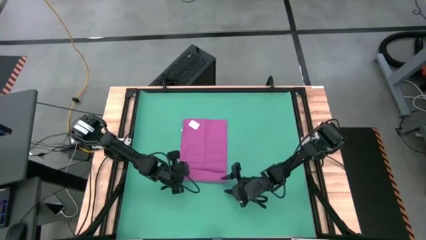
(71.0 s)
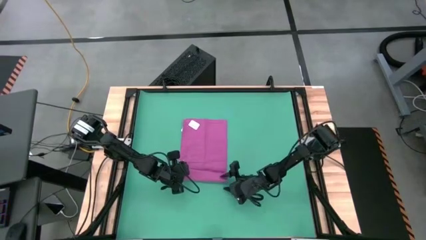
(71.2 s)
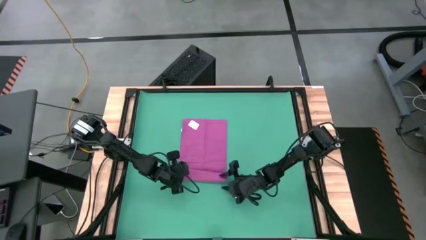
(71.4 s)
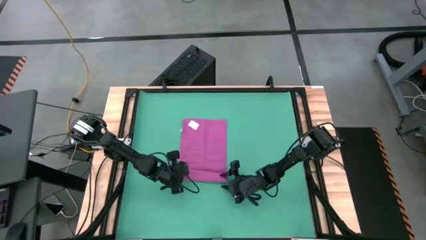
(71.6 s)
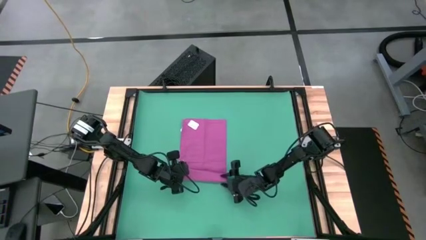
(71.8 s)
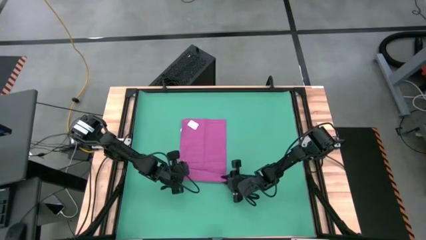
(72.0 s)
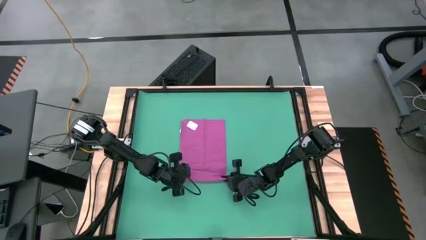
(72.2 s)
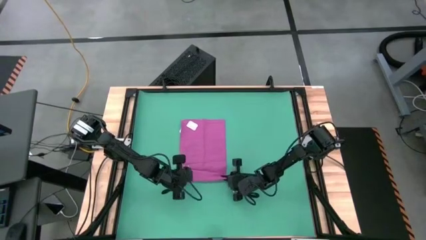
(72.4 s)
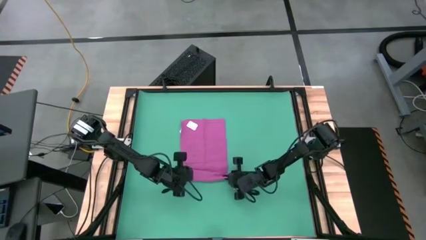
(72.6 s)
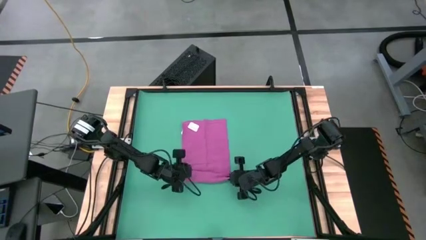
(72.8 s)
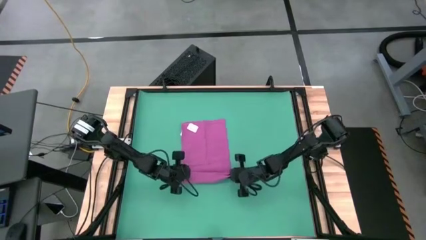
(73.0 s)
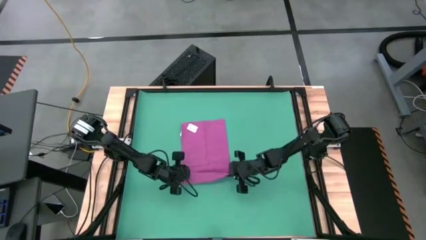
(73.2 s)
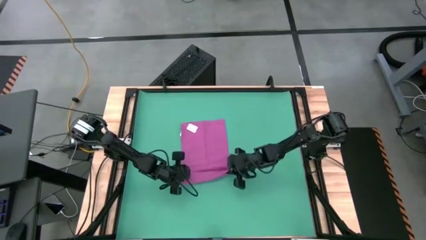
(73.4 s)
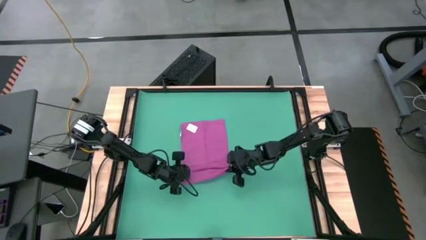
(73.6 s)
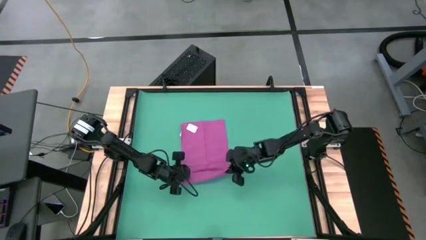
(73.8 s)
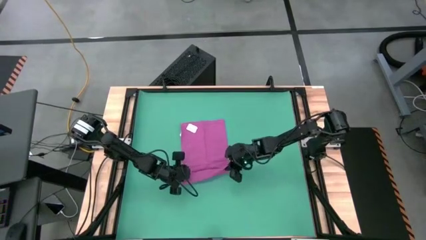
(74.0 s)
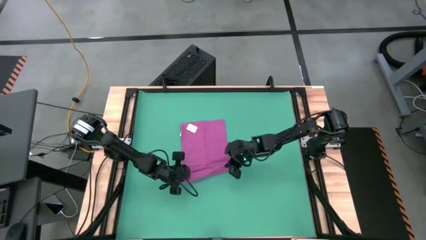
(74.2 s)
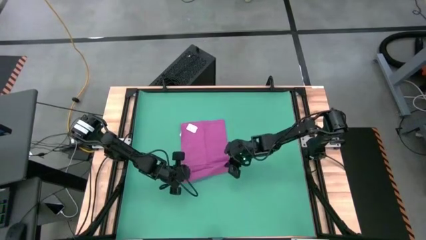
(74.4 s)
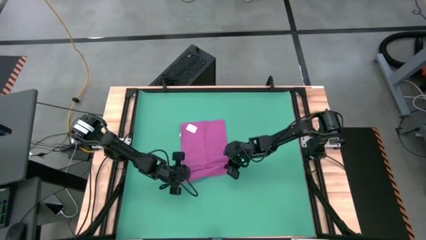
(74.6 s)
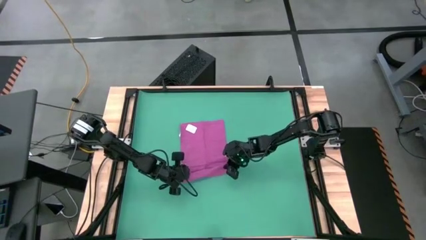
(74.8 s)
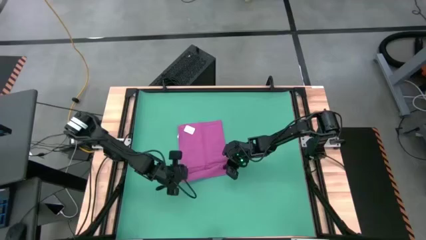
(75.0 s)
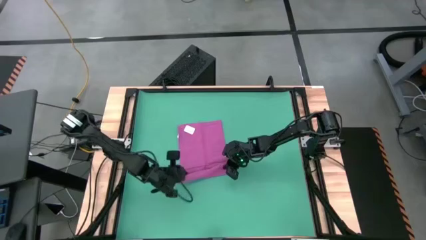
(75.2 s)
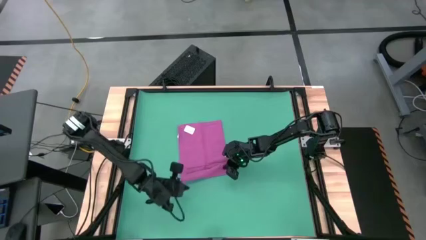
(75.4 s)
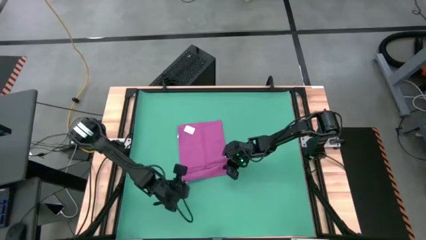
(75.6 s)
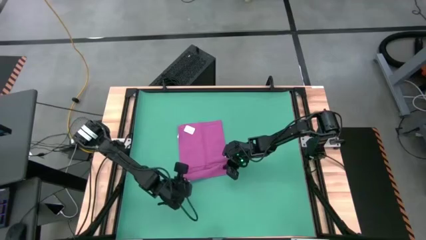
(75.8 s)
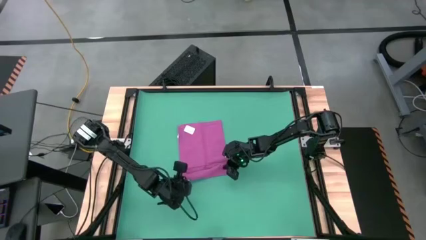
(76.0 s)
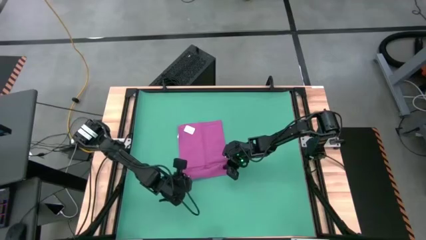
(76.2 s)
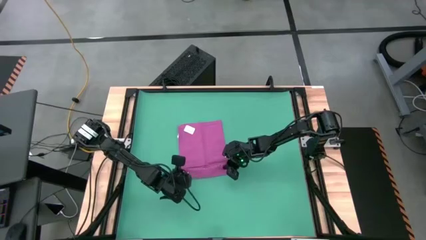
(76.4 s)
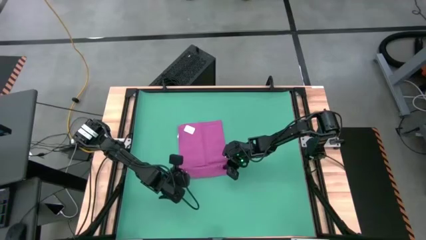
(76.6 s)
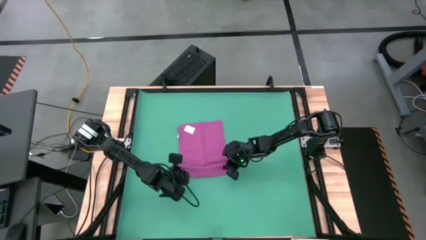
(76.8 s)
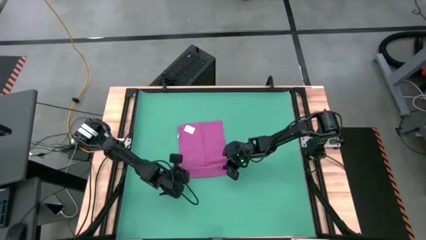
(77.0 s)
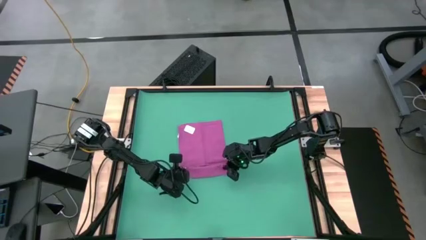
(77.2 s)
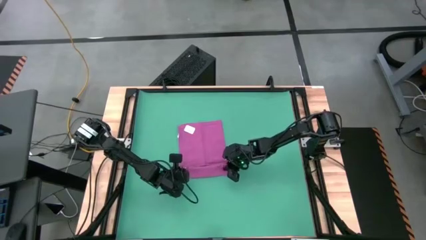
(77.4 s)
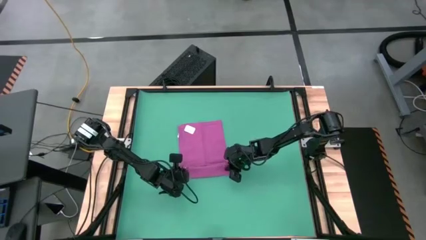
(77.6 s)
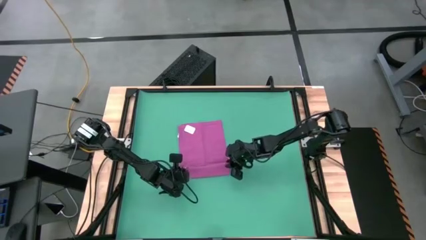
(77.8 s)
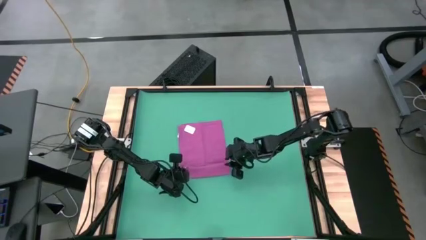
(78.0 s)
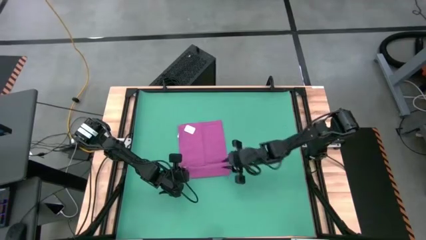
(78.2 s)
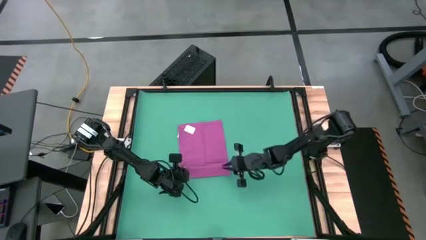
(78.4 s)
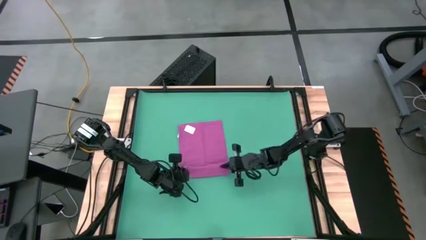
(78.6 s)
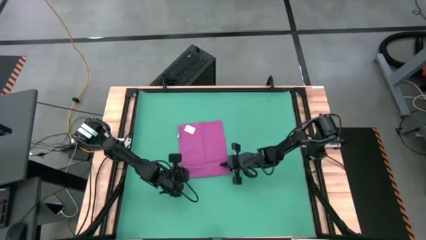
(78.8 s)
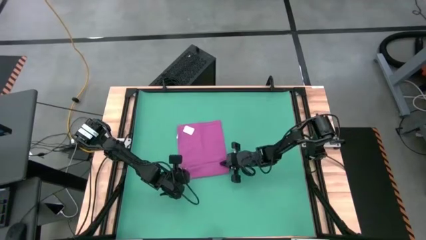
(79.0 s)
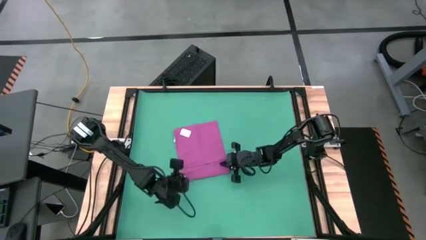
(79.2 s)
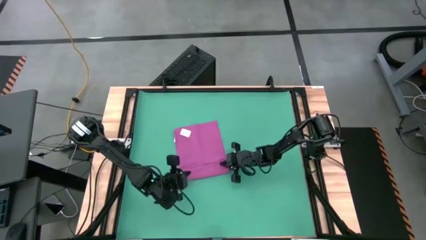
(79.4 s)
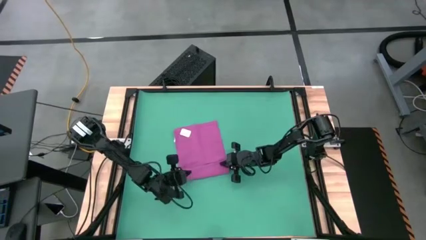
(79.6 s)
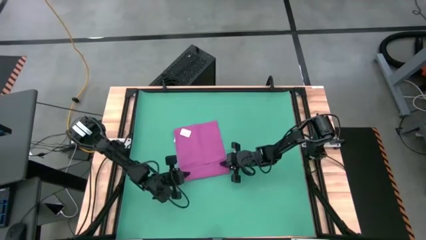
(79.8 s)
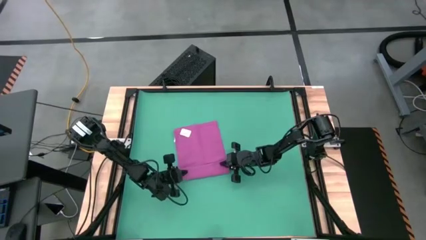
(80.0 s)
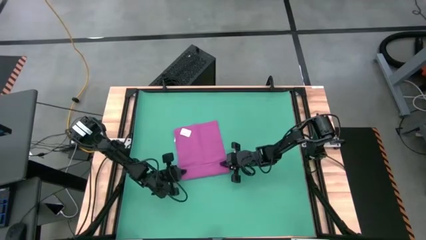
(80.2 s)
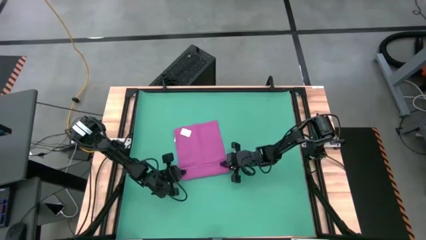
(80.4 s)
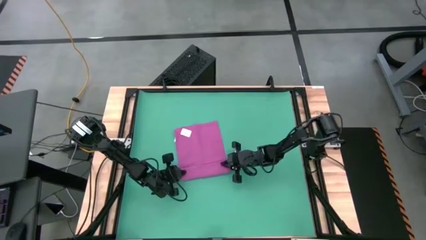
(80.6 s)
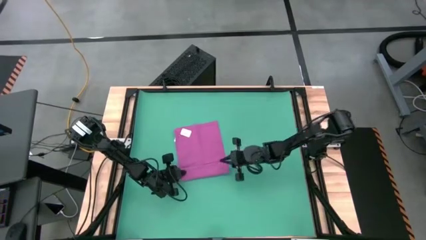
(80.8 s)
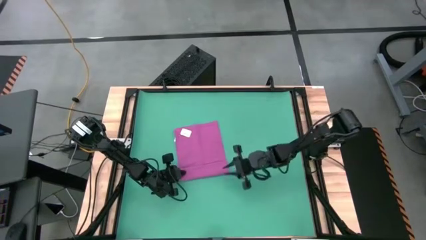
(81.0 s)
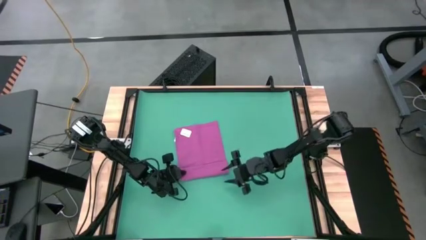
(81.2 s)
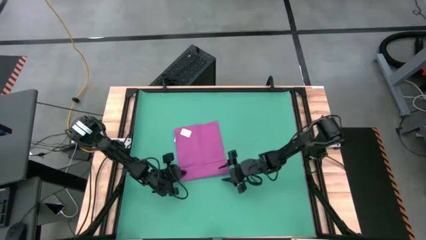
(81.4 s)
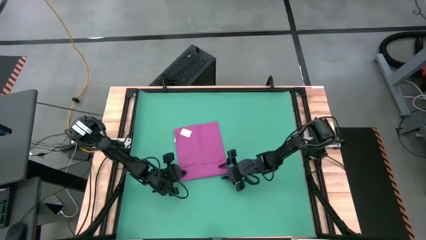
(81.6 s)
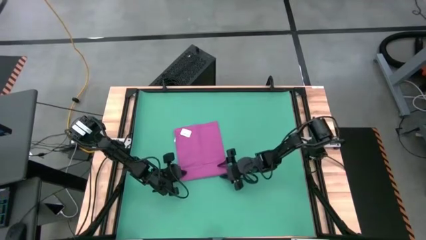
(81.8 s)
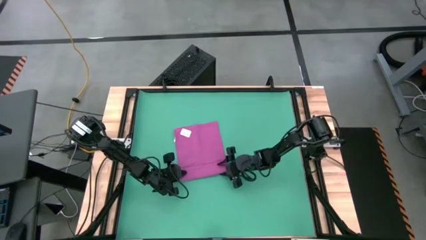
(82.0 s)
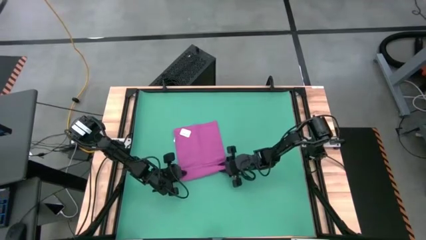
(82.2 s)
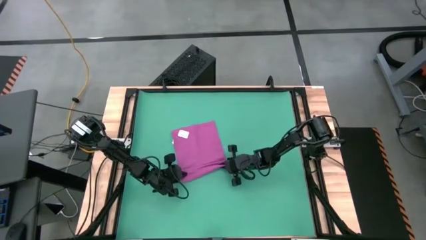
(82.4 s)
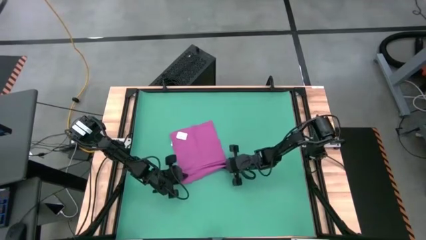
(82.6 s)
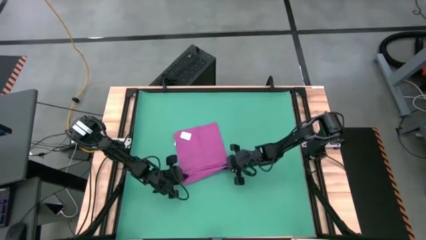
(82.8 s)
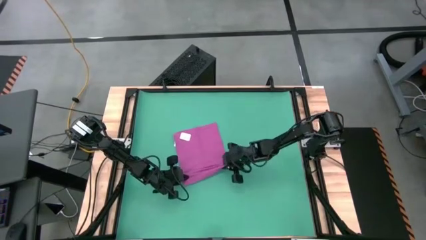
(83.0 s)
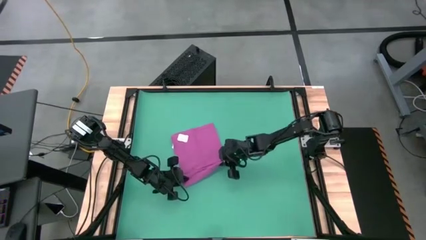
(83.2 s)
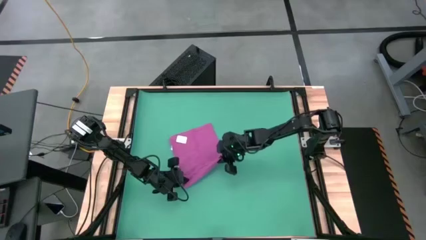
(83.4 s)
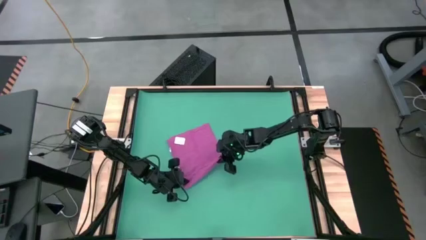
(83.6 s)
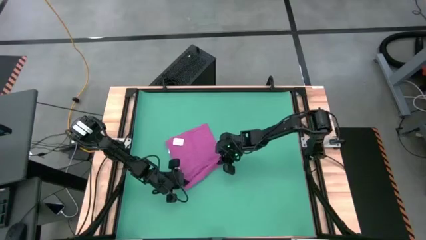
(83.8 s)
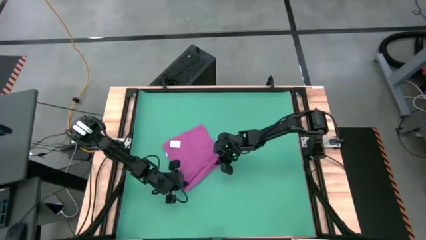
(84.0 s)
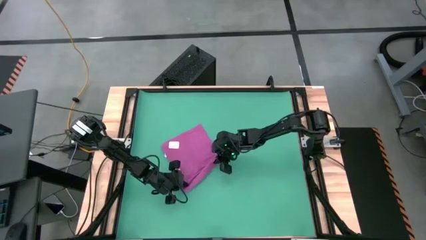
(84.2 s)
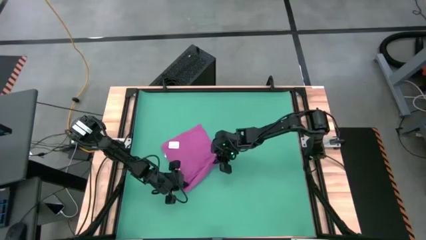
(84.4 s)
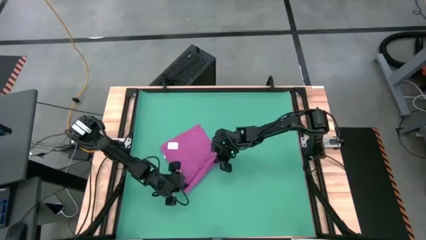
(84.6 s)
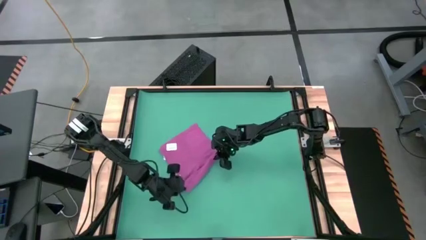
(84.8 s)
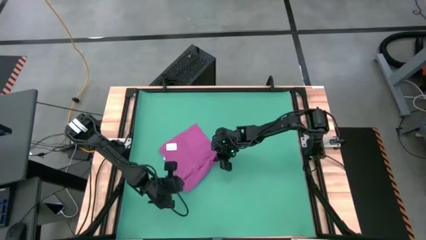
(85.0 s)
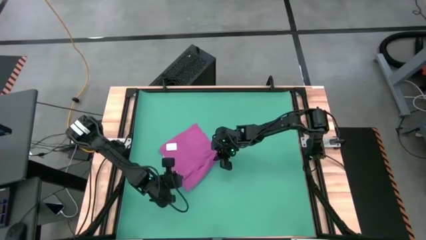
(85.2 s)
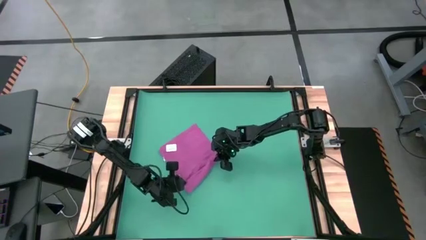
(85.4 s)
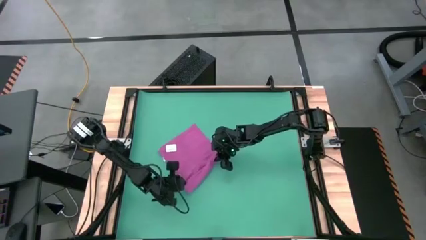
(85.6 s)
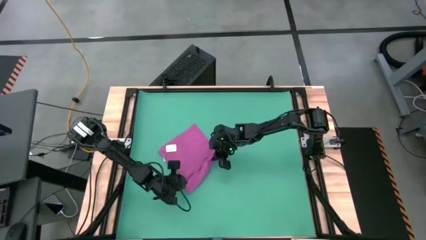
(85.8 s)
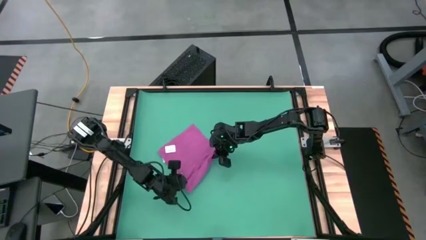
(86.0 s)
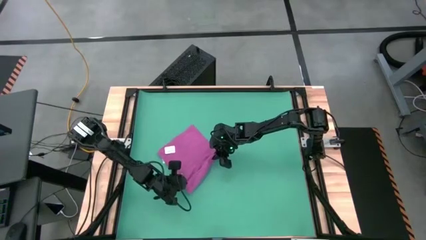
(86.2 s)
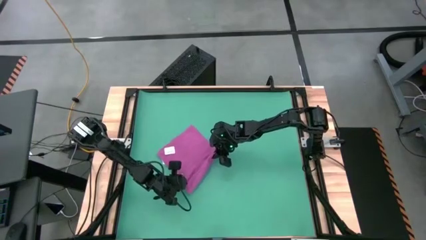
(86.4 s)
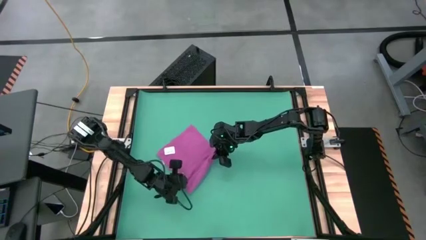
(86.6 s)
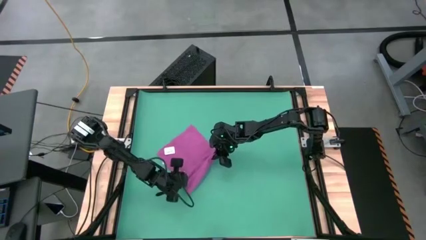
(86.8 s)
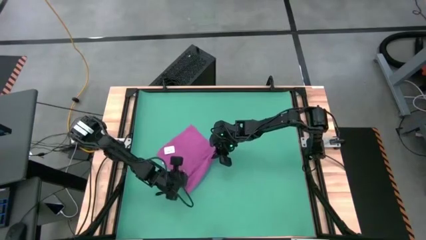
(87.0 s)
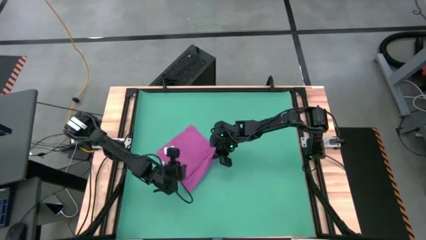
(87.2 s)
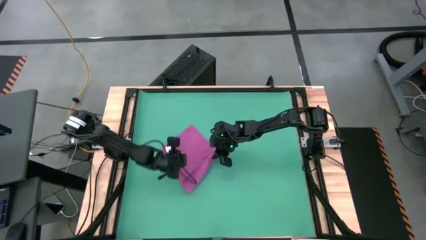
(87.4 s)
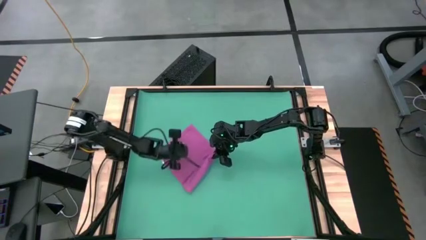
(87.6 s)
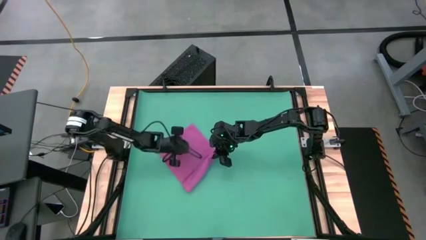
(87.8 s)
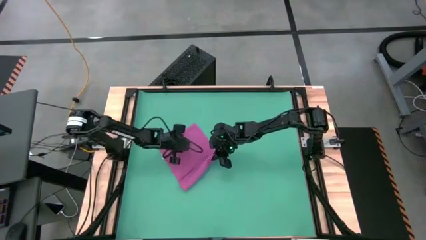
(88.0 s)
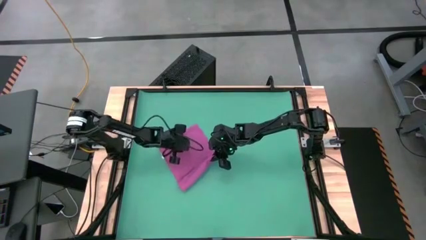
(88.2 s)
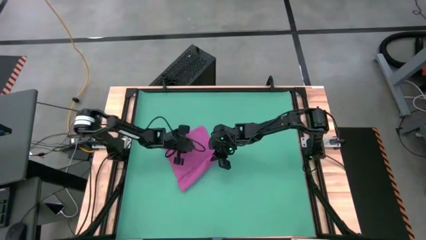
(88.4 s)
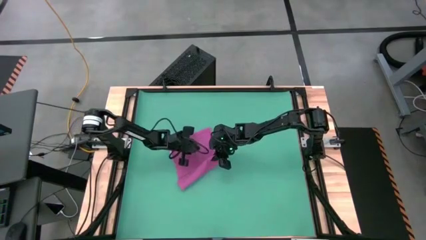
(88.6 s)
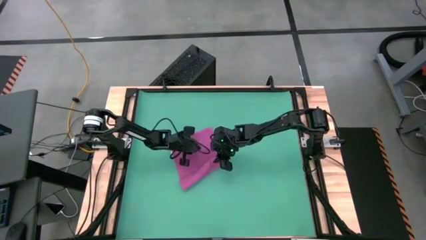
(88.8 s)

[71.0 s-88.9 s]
Task: Roll towel
Roll the violet towel
